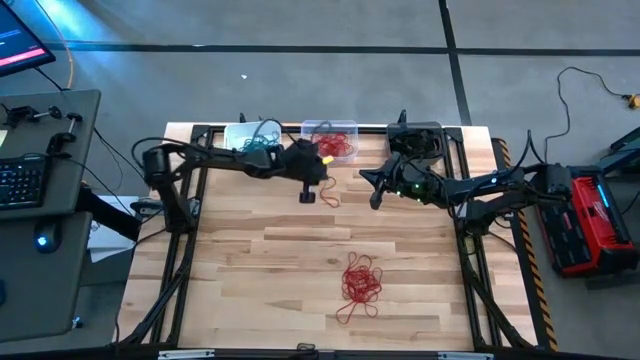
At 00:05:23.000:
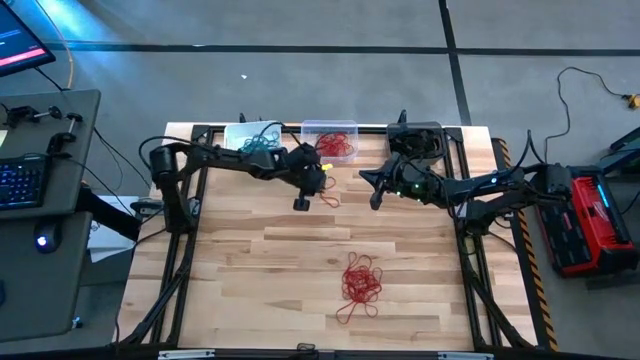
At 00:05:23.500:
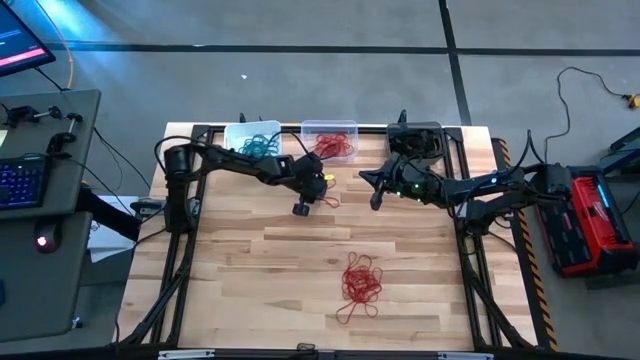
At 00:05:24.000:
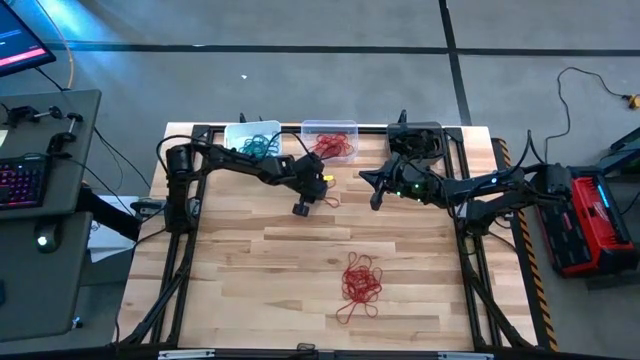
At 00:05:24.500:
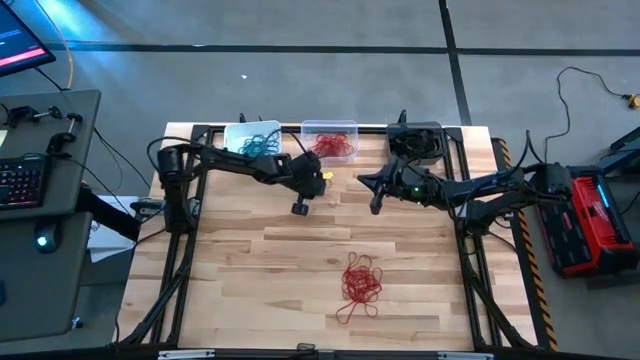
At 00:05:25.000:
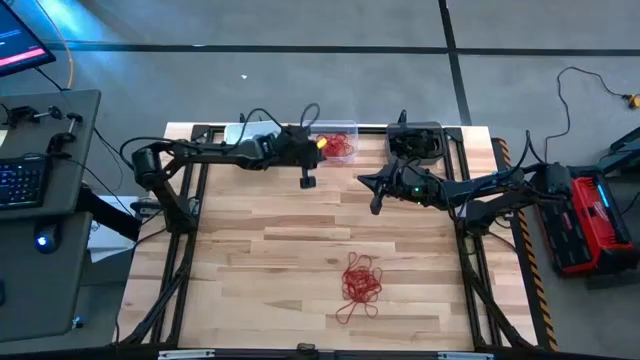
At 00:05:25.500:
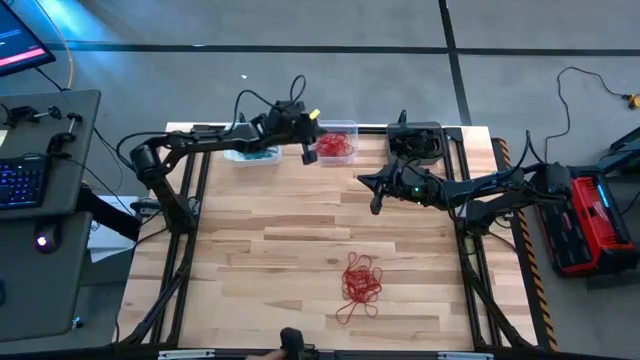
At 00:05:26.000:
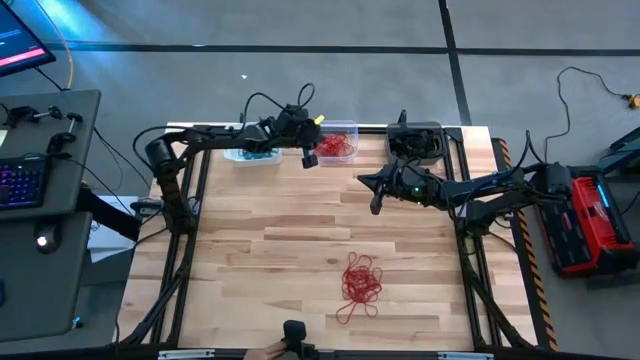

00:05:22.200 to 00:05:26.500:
Task: Sort rubber bands into baskets
Put the red rubber band into the transparent bin

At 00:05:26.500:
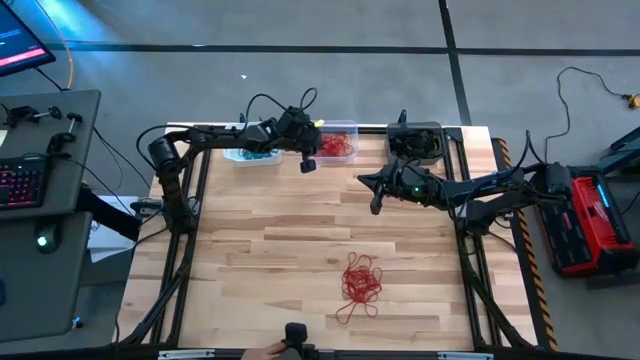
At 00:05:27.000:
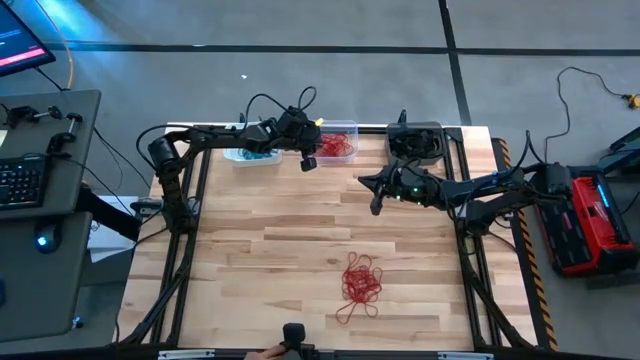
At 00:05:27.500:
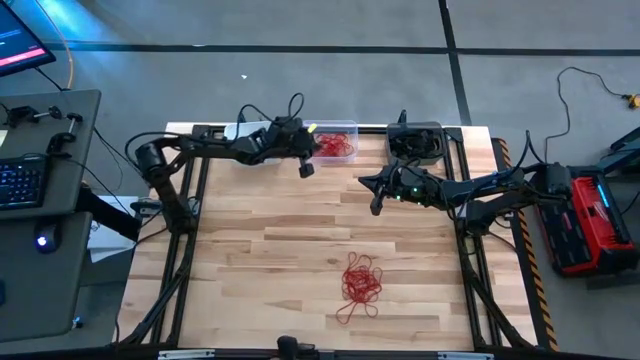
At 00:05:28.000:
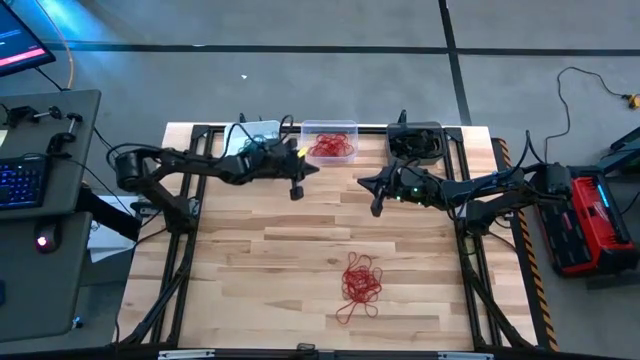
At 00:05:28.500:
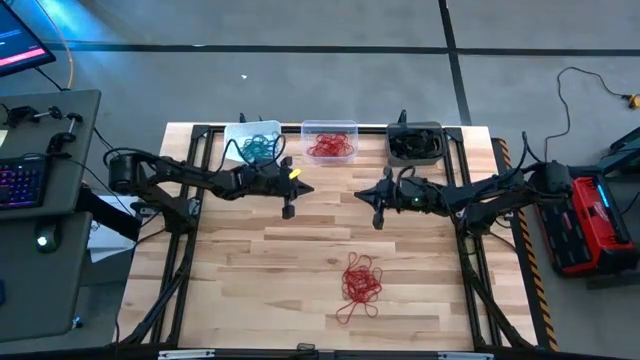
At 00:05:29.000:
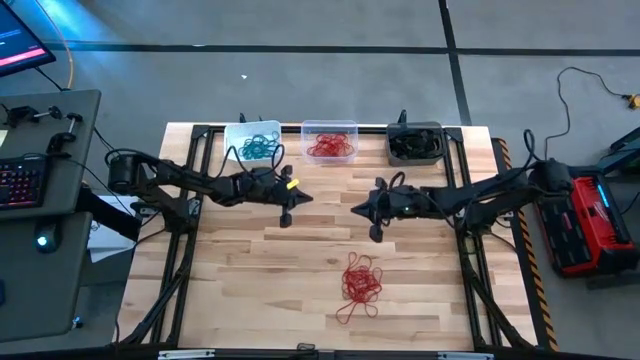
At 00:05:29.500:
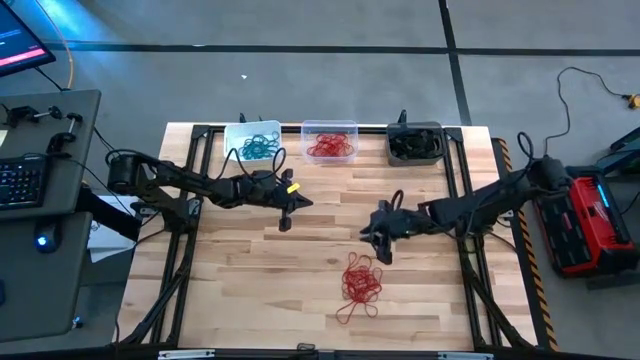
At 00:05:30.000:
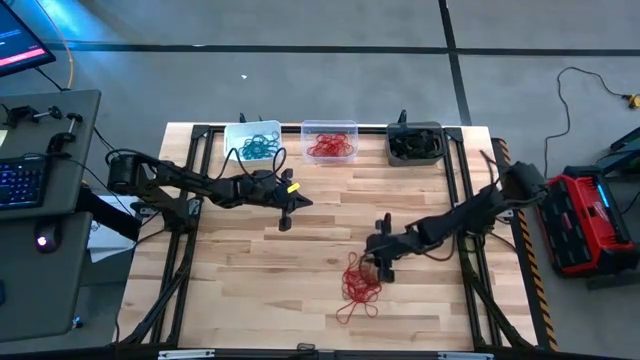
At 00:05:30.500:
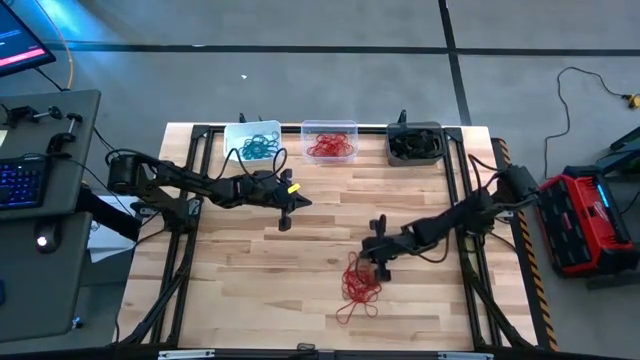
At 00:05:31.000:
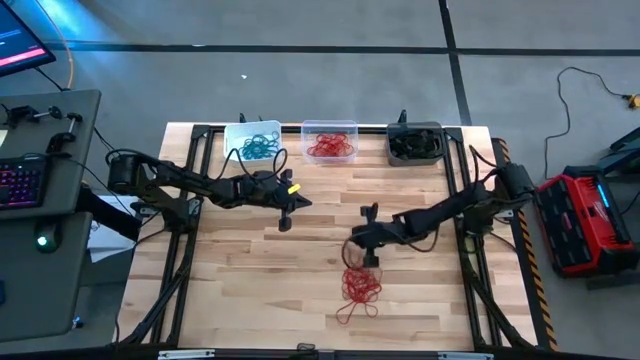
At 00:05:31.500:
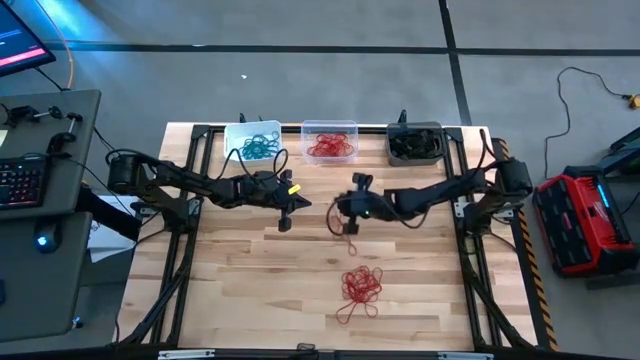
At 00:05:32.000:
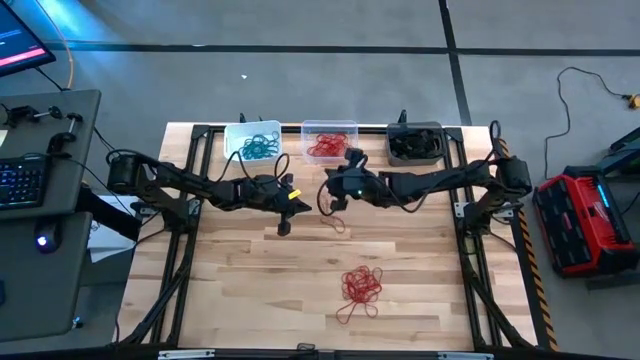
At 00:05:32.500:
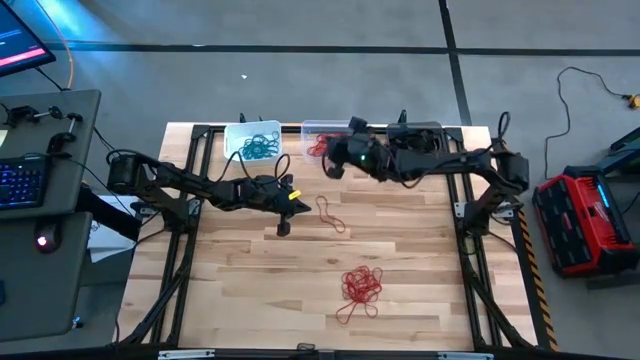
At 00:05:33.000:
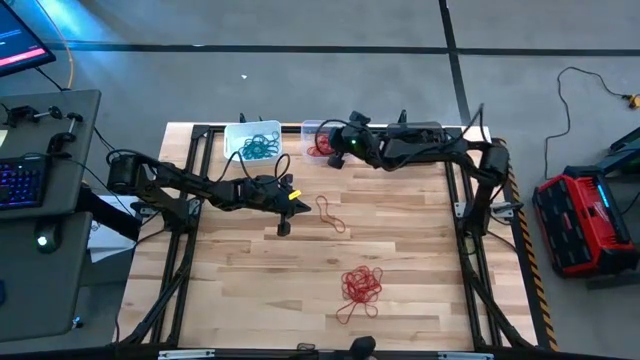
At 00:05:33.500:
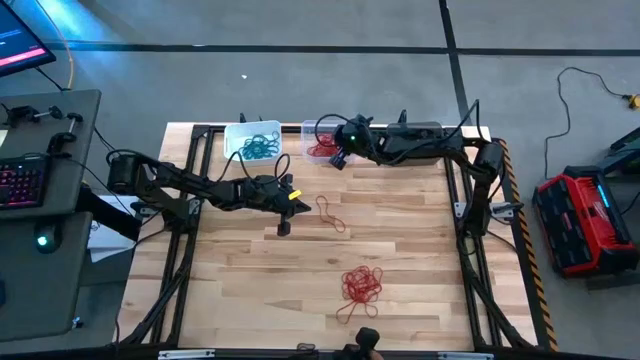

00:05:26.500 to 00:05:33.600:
Put the red rubber band into the transparent bin

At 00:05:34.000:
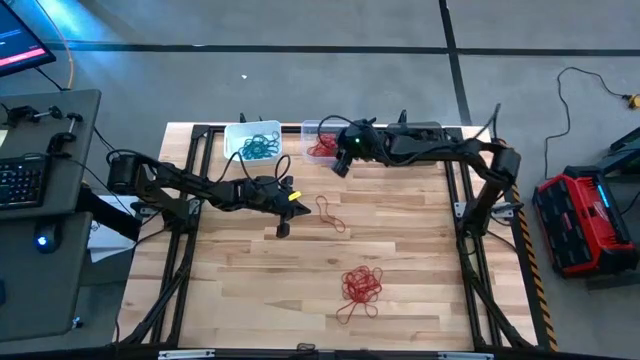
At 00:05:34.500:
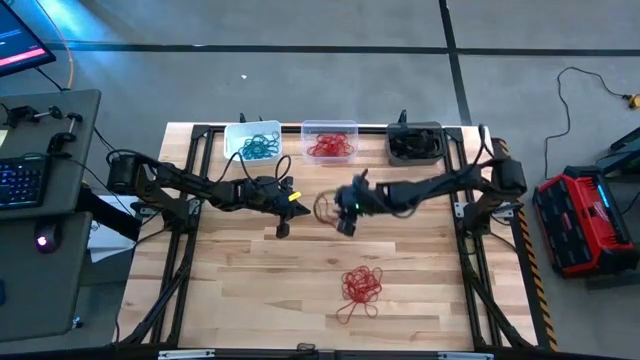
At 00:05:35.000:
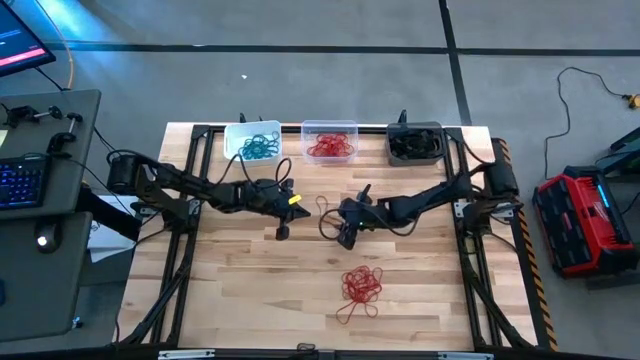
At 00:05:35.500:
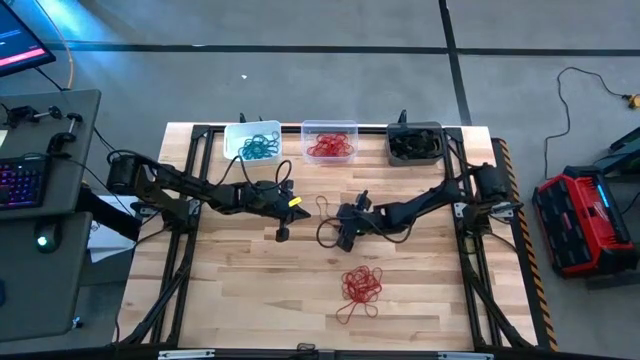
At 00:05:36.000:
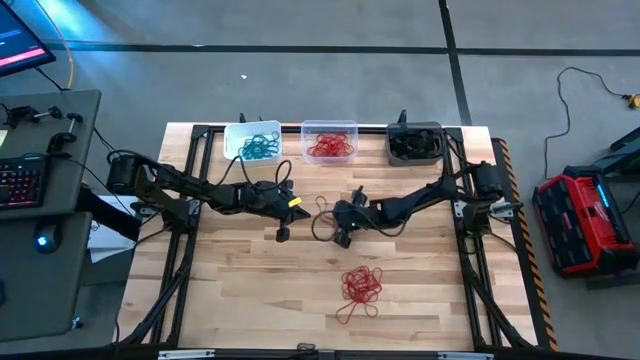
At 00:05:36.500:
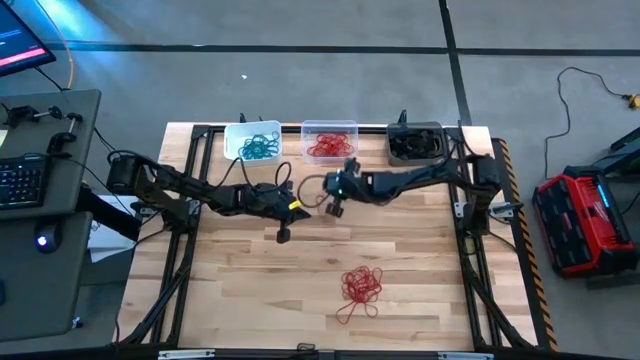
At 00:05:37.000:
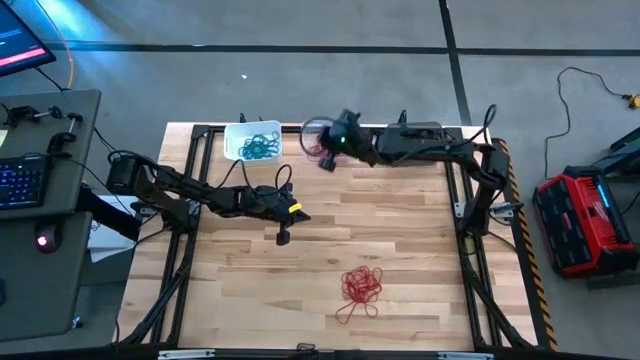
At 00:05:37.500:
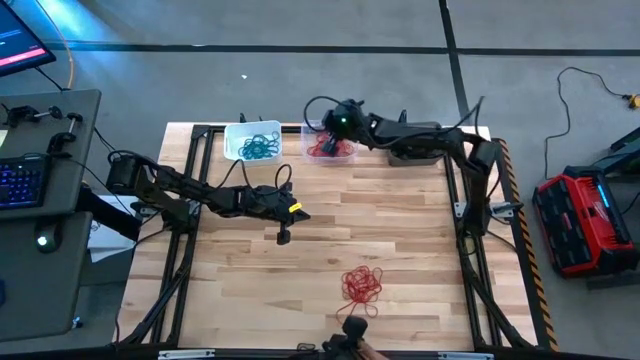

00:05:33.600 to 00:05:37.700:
Put the red rubber band into the transparent bin

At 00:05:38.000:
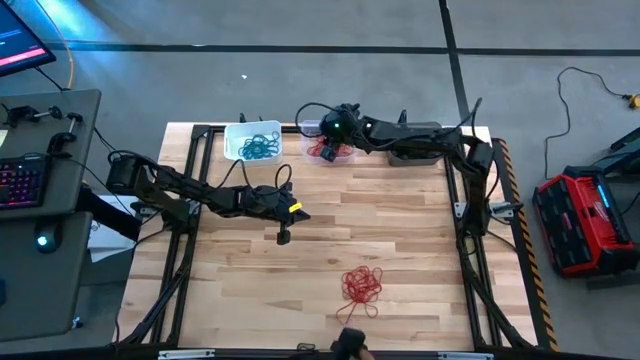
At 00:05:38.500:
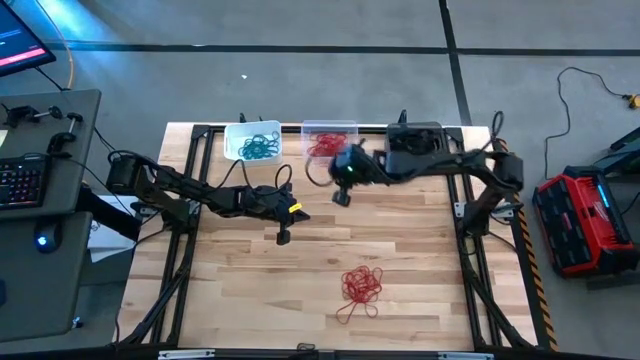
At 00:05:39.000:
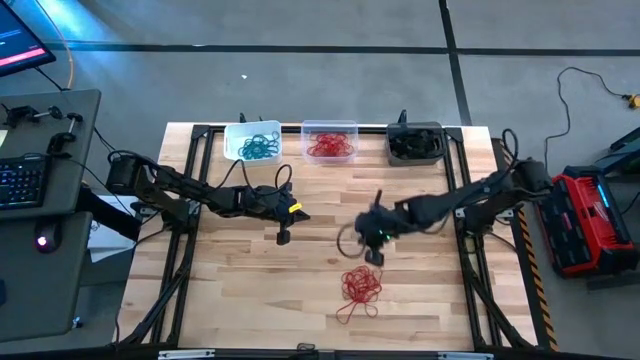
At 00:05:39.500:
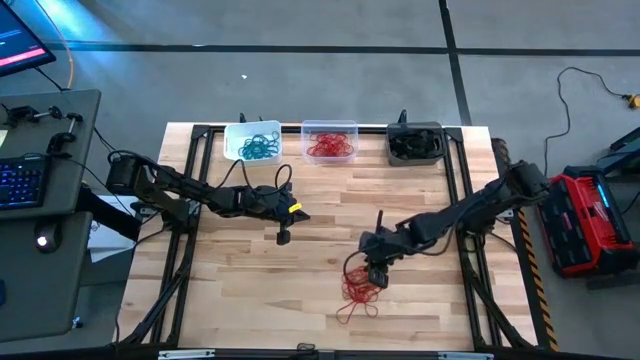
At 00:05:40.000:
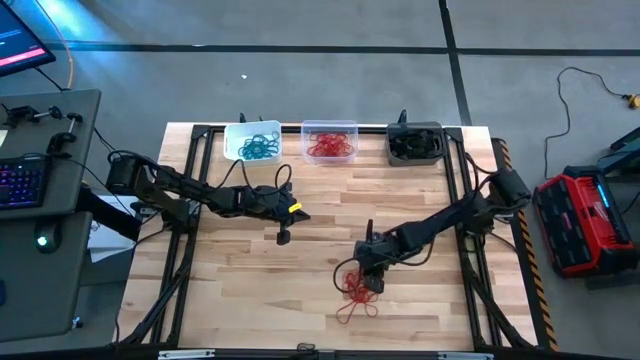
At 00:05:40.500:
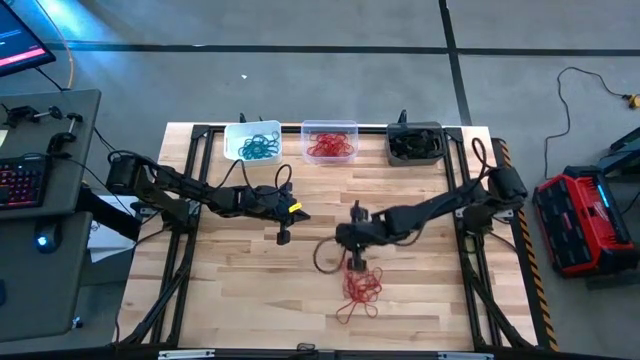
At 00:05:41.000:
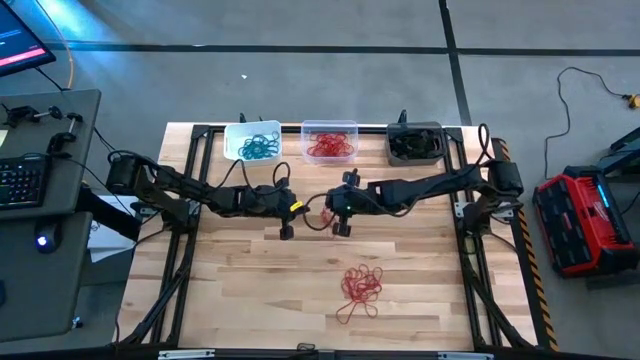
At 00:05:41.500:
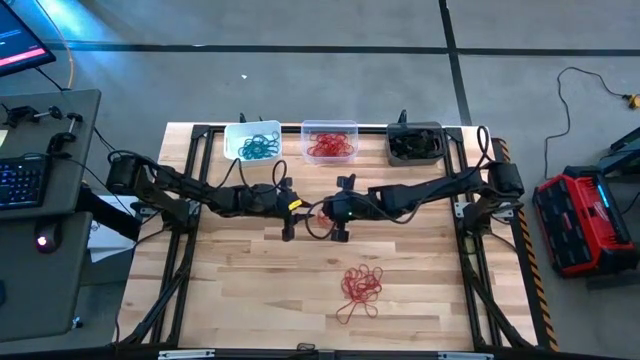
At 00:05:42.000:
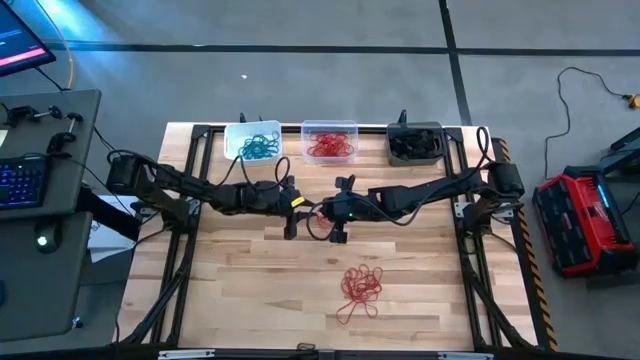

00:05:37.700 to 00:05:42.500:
Put the red rubber band into the transparent bin

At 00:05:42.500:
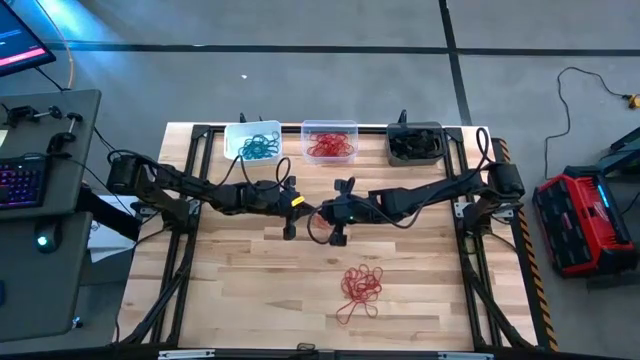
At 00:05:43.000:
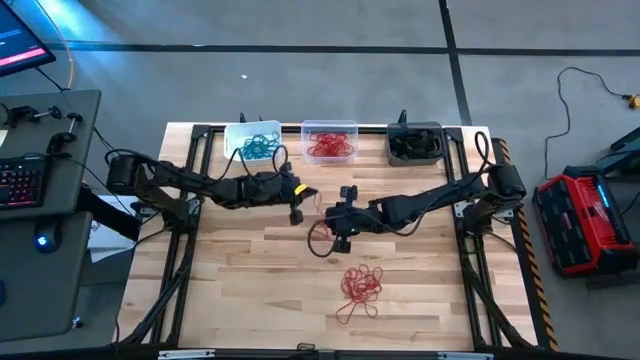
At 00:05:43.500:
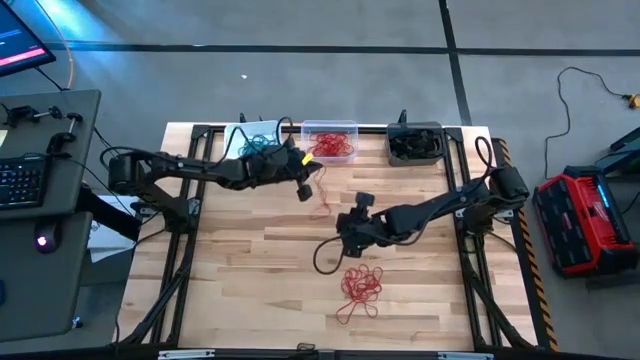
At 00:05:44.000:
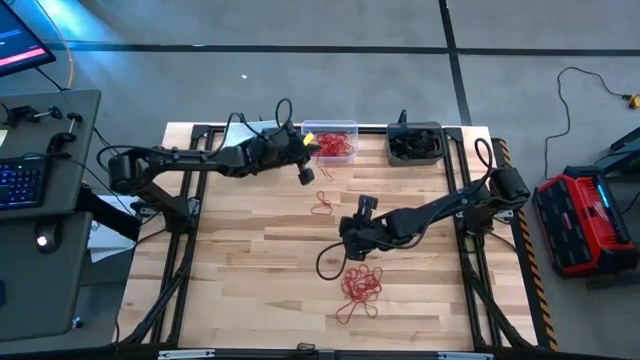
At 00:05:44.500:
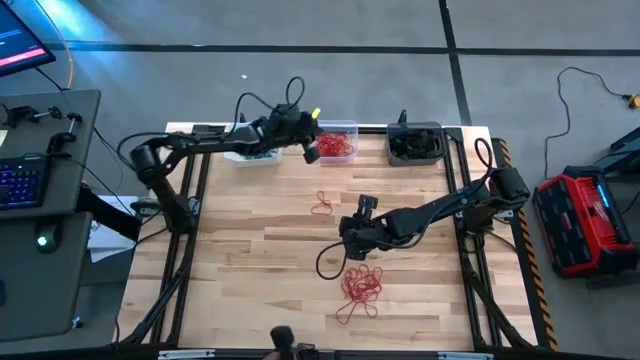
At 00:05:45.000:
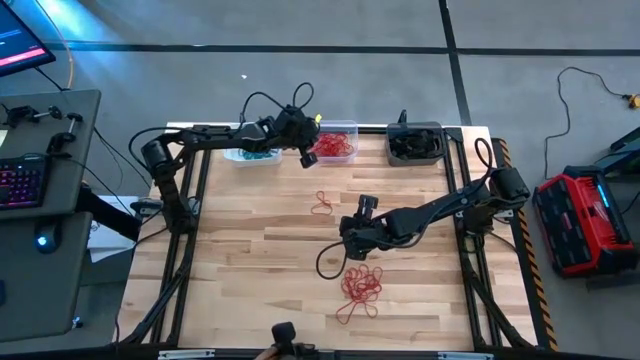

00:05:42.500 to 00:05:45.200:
Put the red rubber band into the transparent bin
